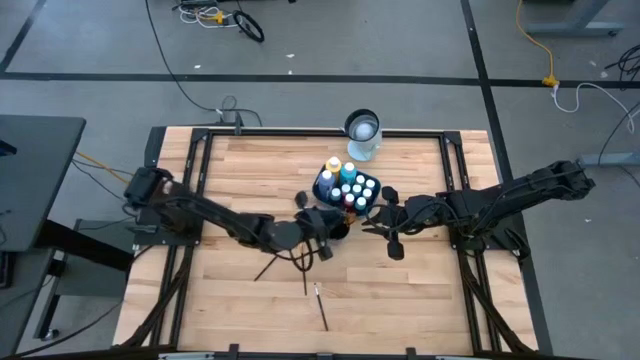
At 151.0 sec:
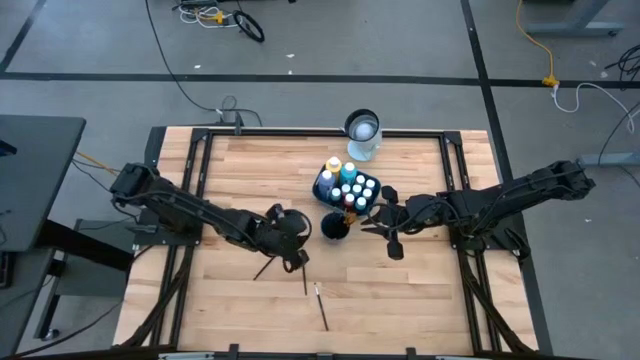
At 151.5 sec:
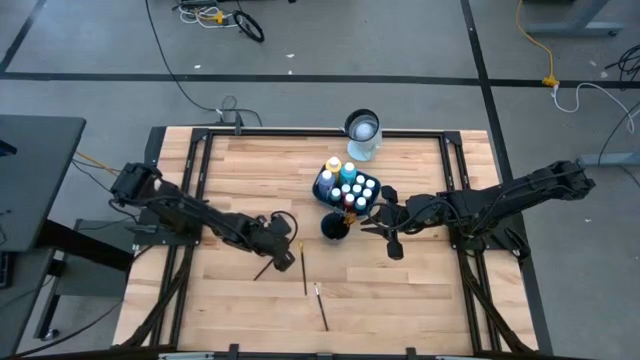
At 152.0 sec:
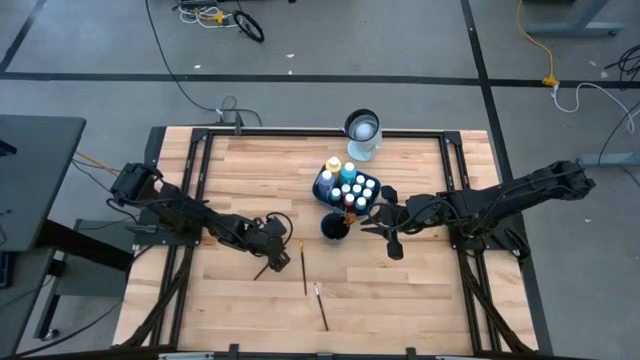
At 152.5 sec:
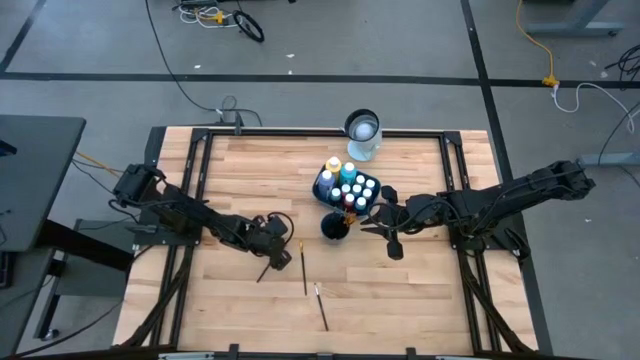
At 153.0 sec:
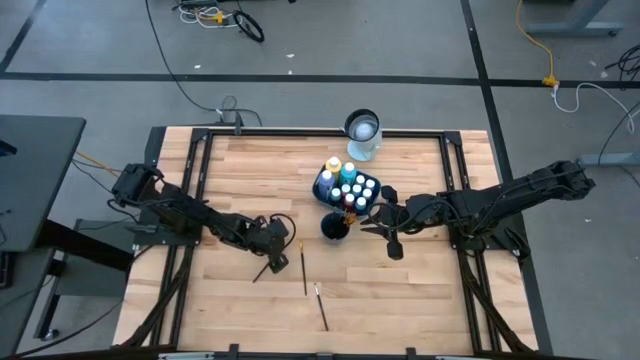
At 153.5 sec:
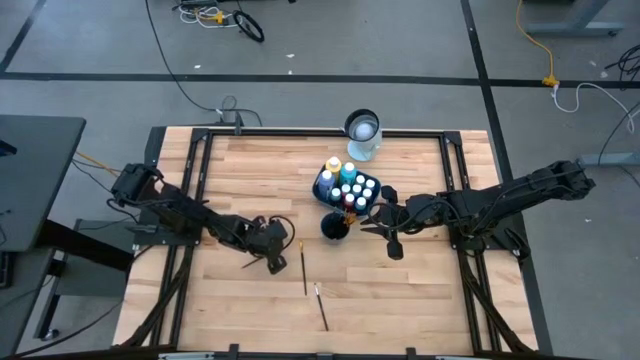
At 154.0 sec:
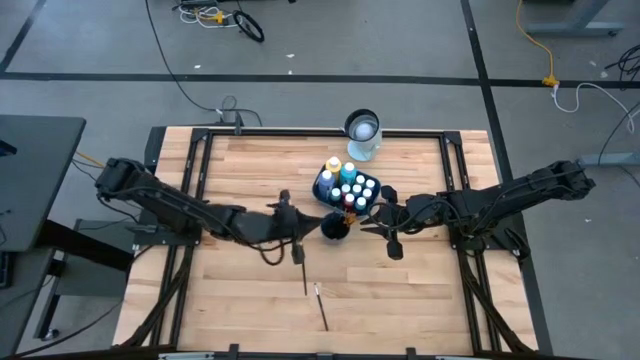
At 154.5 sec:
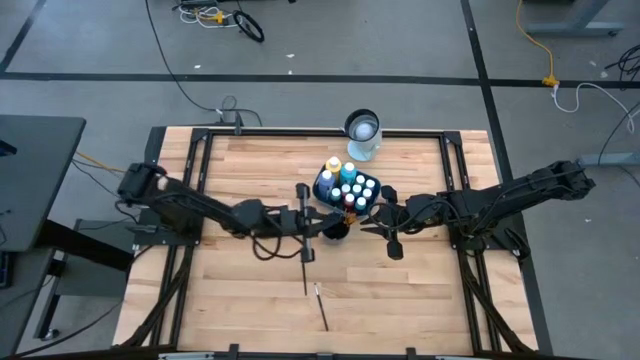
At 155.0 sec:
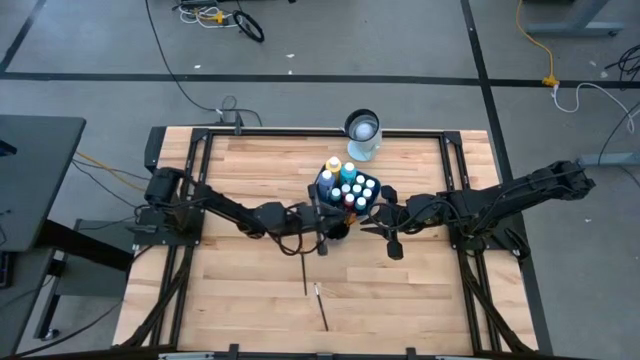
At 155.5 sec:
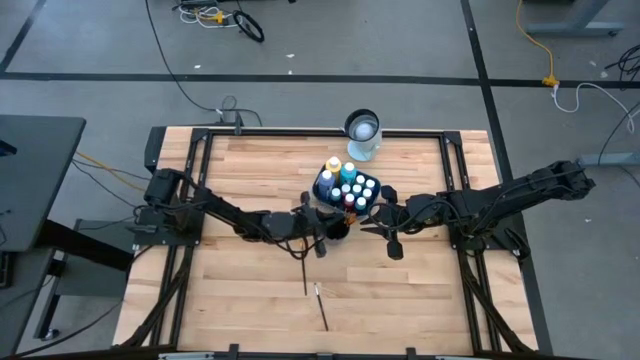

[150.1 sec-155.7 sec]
Task: Pick & Place Paint Supplies
Put the silver paint brush into the blue cup

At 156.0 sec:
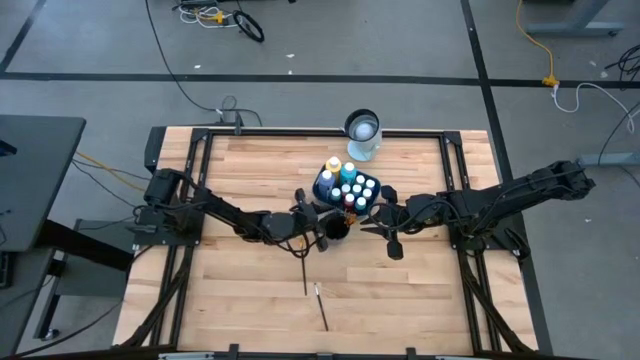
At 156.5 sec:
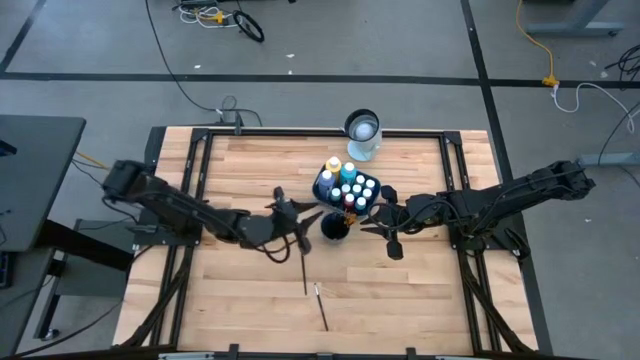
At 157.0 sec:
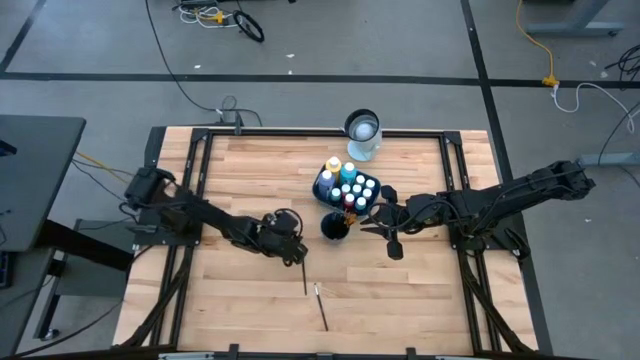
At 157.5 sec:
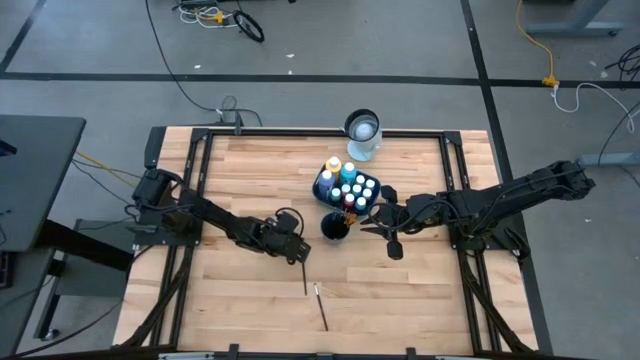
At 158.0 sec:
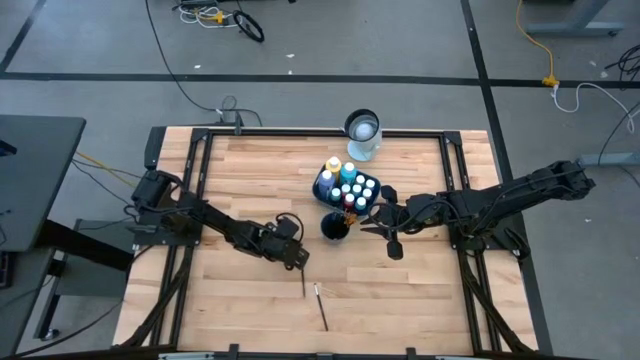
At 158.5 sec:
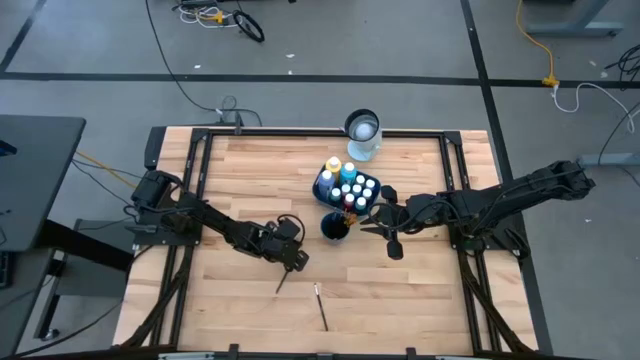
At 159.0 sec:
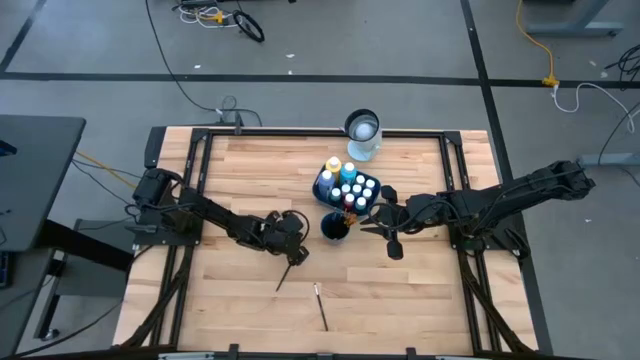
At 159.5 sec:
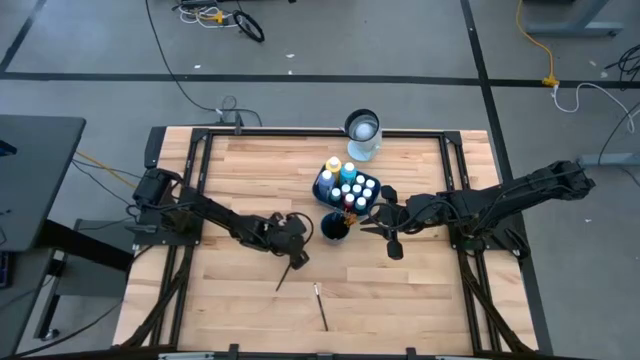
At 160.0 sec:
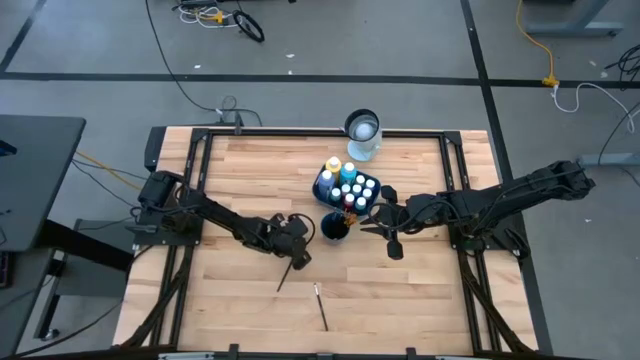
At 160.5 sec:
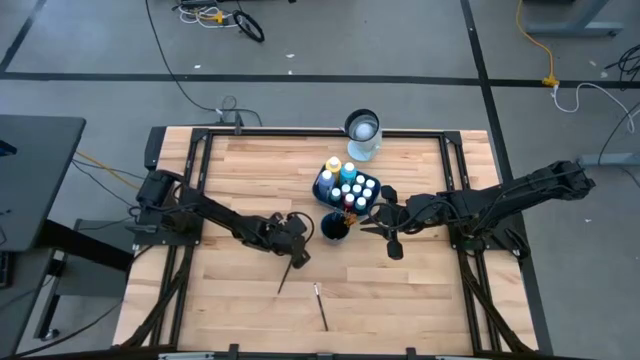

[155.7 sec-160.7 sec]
Put the gold paint brush into the blue cup

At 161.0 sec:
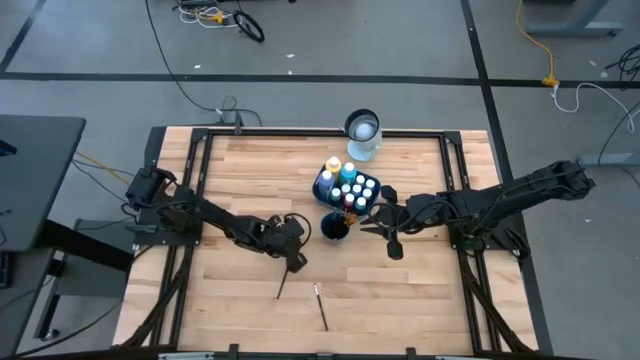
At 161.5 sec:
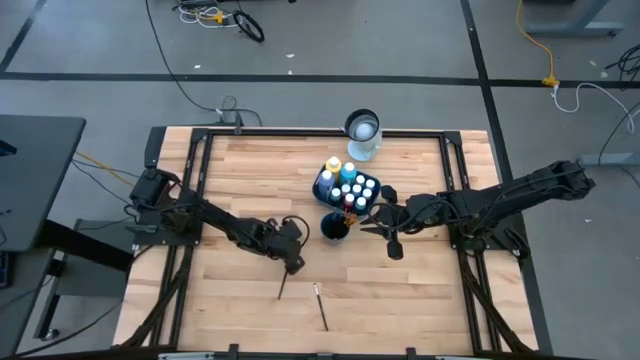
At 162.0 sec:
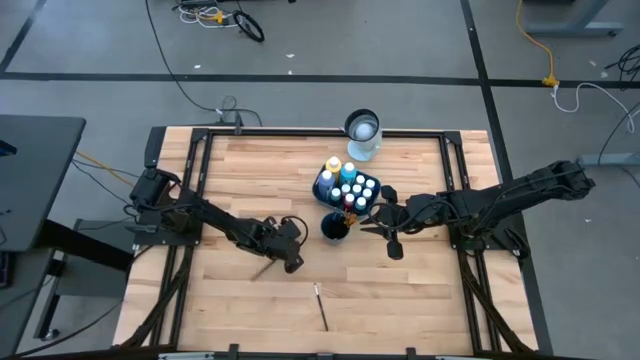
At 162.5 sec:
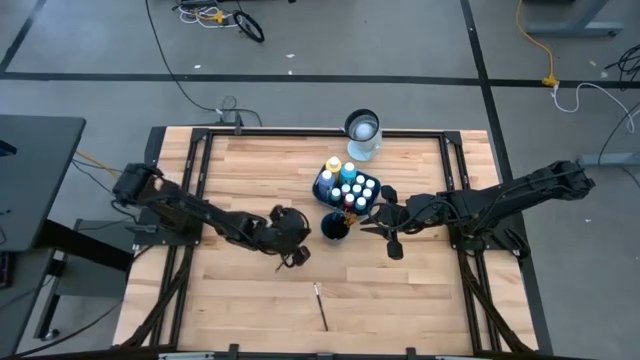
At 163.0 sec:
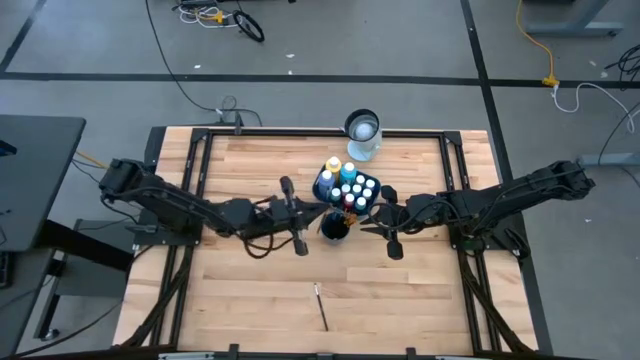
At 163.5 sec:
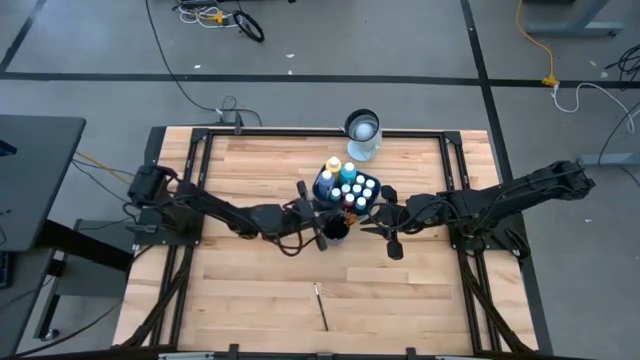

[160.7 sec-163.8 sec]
Put the gold paint brush into the blue cup

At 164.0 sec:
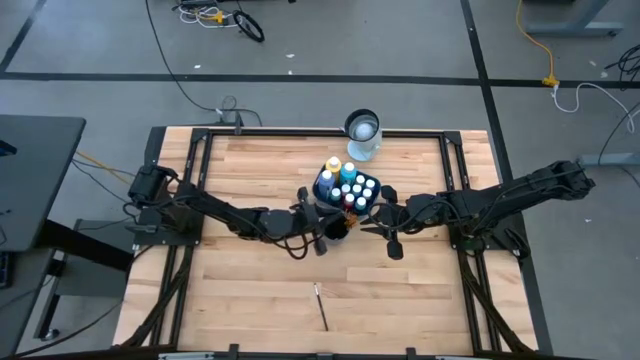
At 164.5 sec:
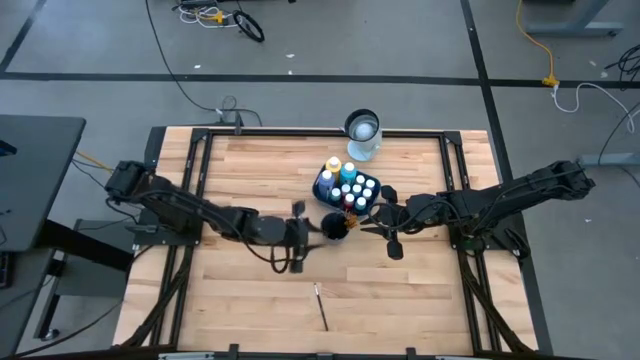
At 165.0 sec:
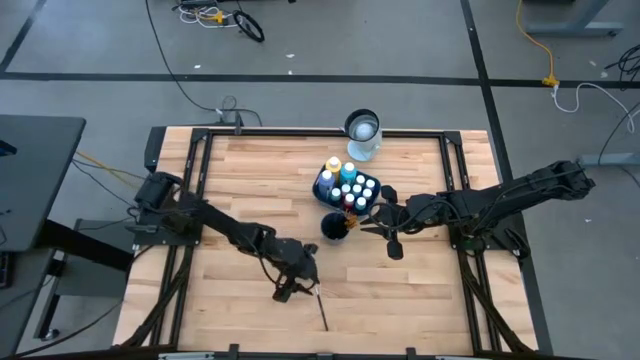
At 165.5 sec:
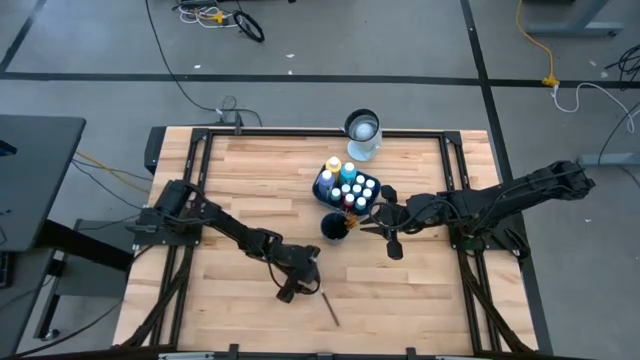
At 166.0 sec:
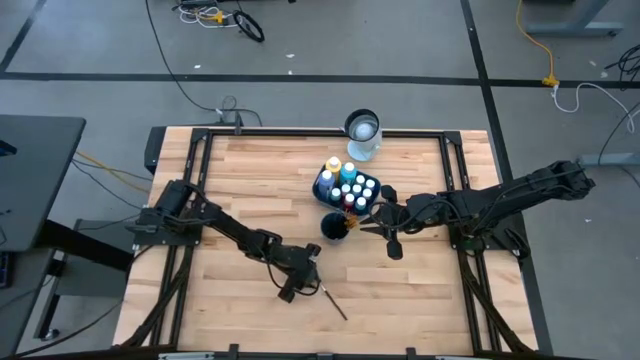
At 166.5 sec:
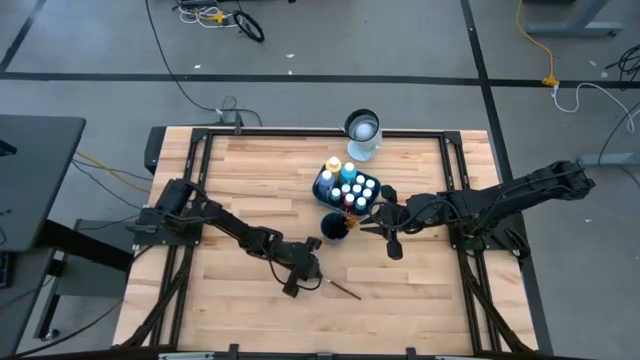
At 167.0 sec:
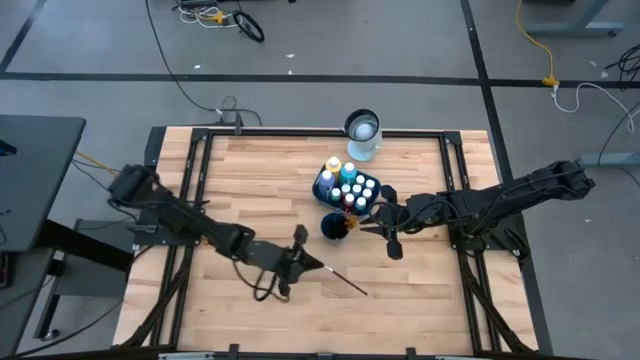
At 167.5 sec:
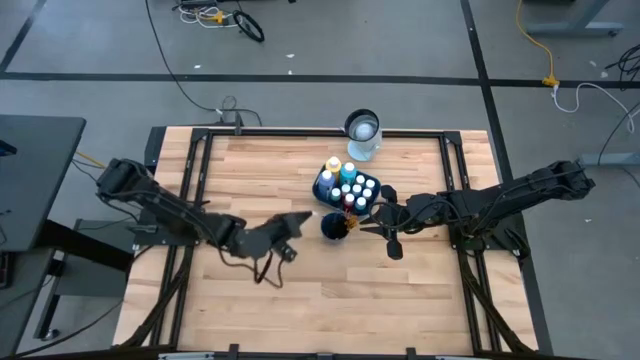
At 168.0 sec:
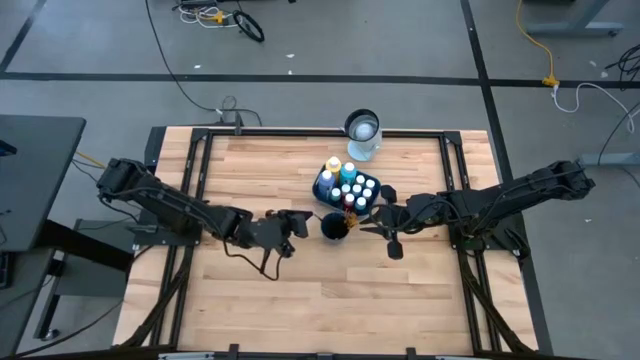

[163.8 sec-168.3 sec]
Put the silver paint brush into the blue cup

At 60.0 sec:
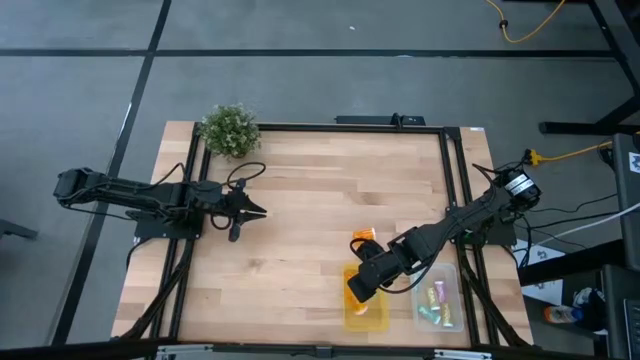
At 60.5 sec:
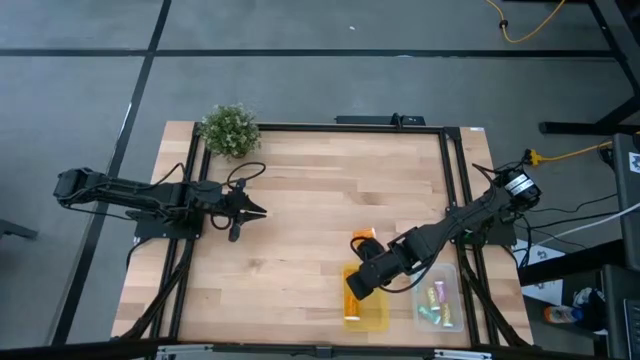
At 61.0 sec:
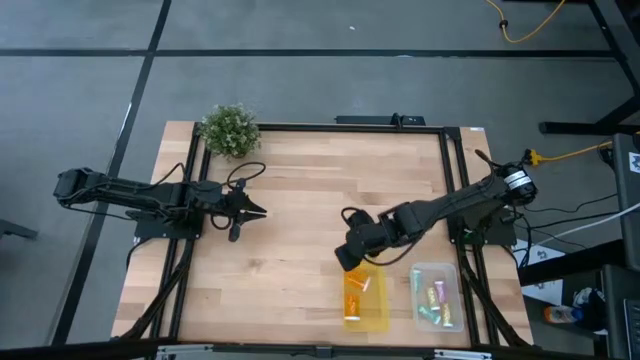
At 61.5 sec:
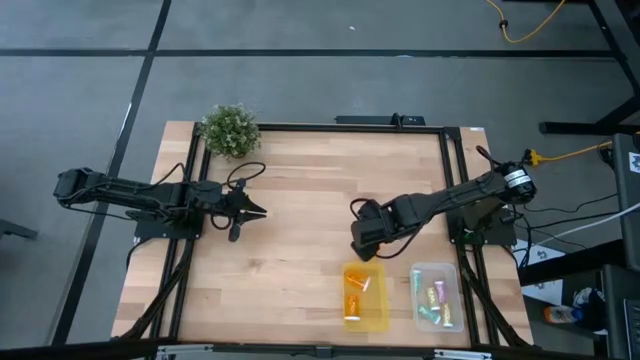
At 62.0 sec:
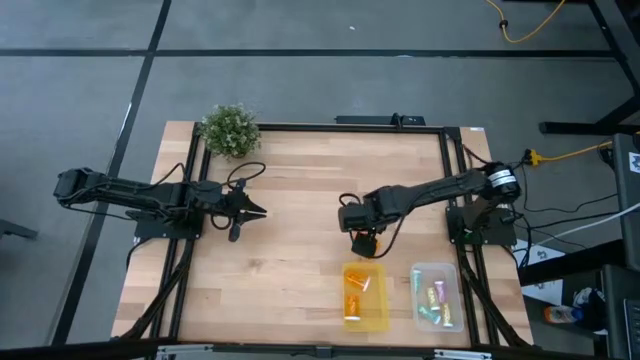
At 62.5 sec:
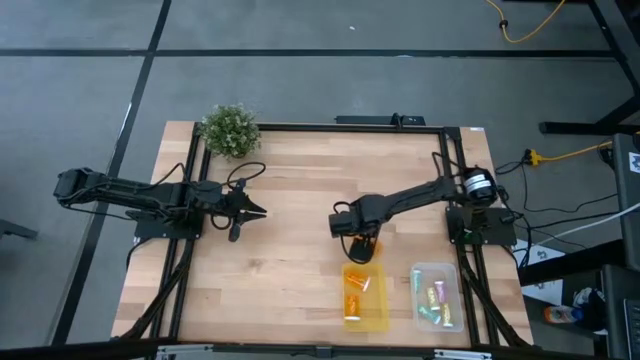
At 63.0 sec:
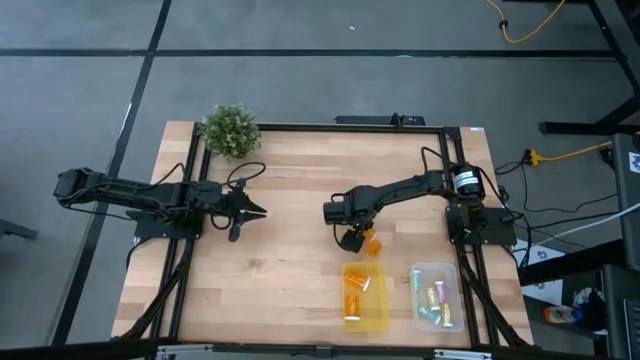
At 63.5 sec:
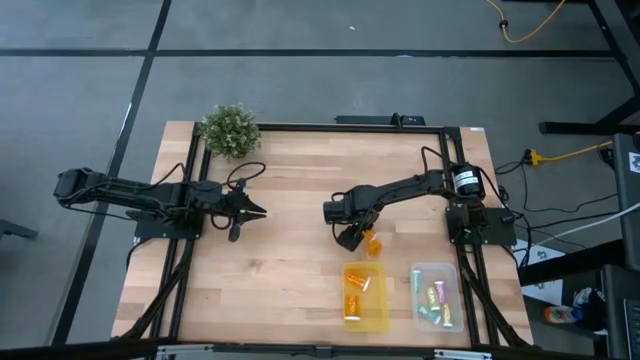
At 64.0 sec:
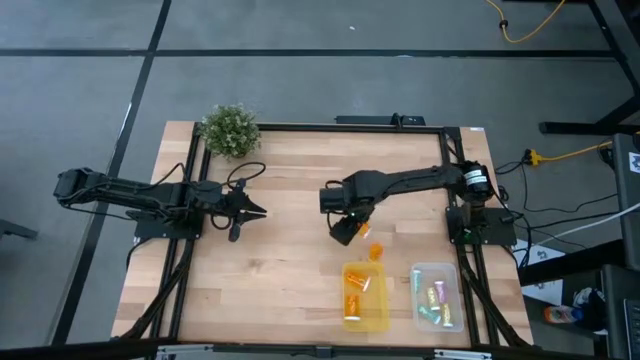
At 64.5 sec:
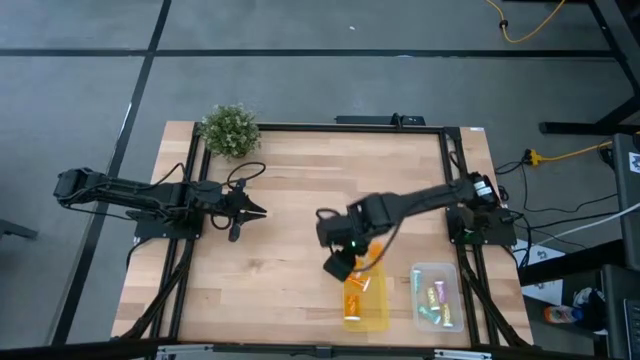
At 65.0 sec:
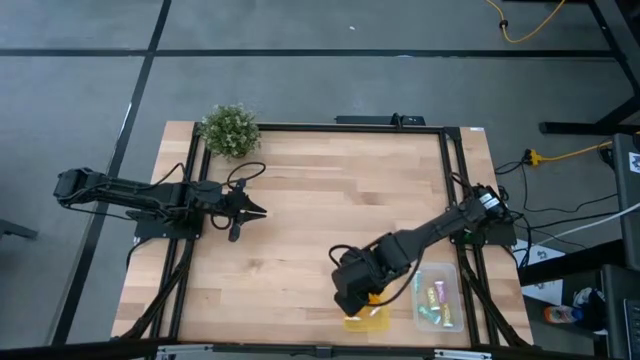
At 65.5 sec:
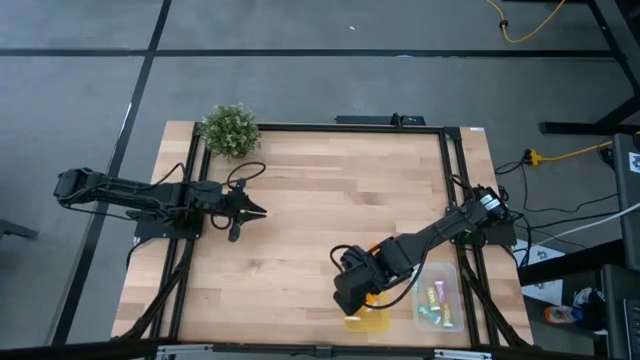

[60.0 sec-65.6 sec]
Task: Pick and place medicine bottles into bin by pill shape (circle, oval)
Put the orange capsule bottle into the yellow bin
